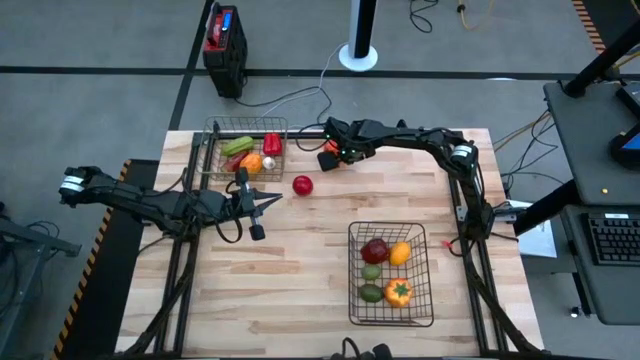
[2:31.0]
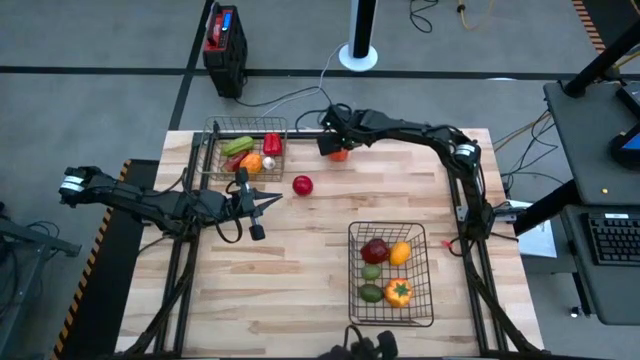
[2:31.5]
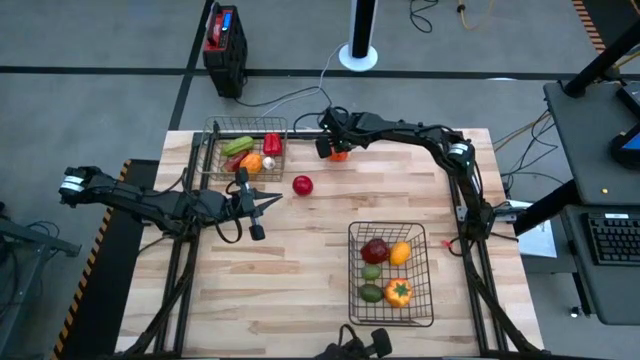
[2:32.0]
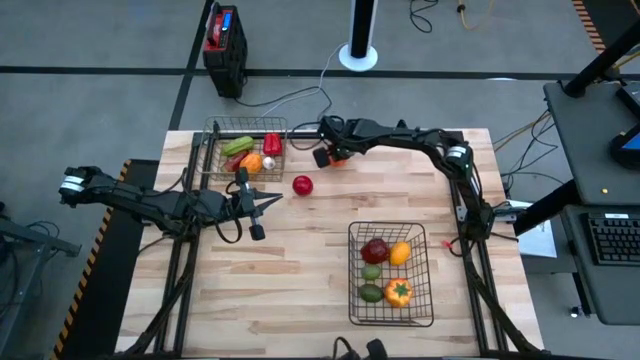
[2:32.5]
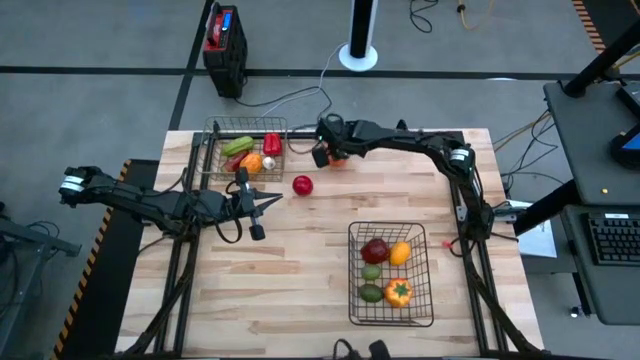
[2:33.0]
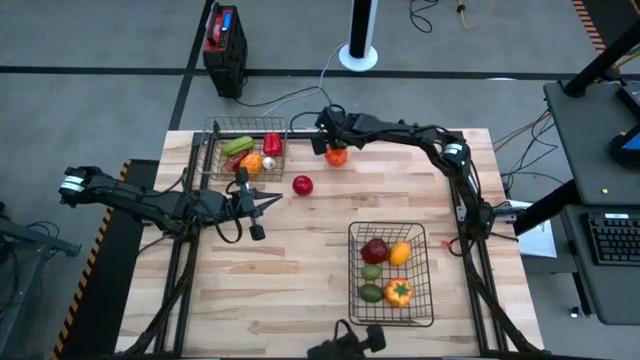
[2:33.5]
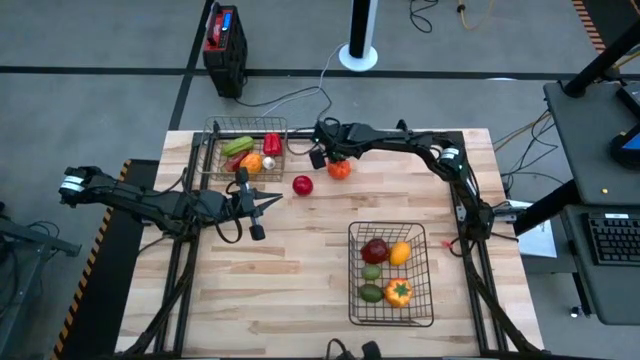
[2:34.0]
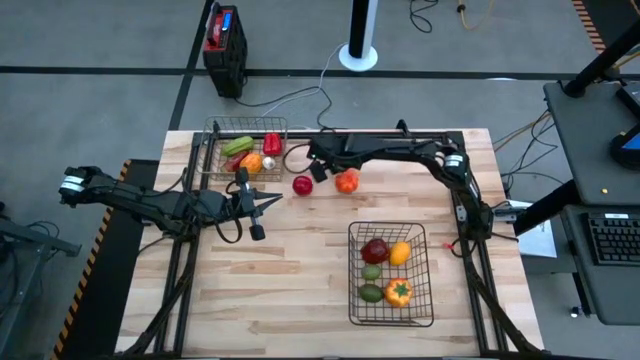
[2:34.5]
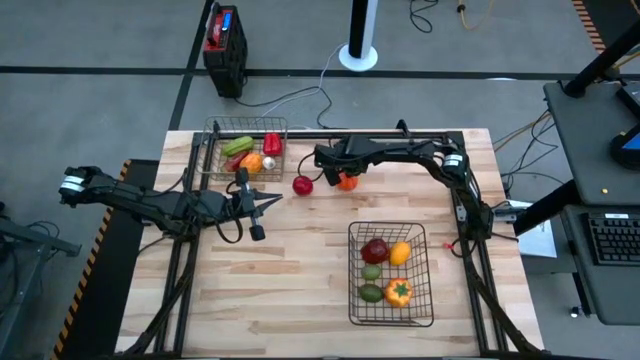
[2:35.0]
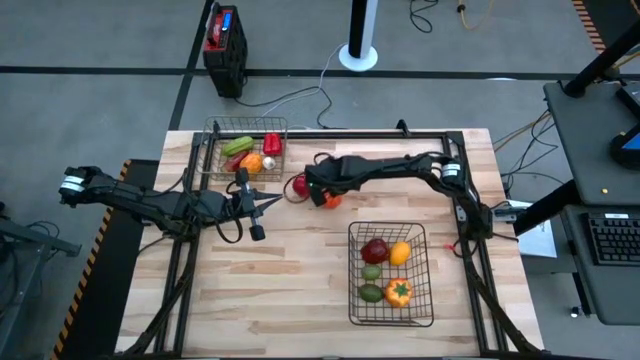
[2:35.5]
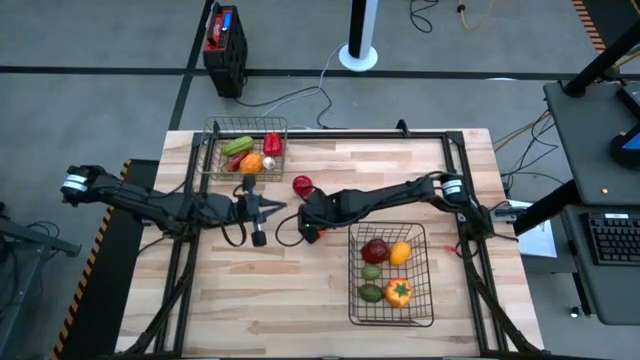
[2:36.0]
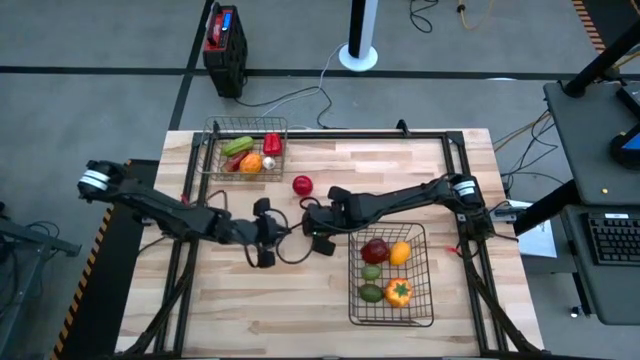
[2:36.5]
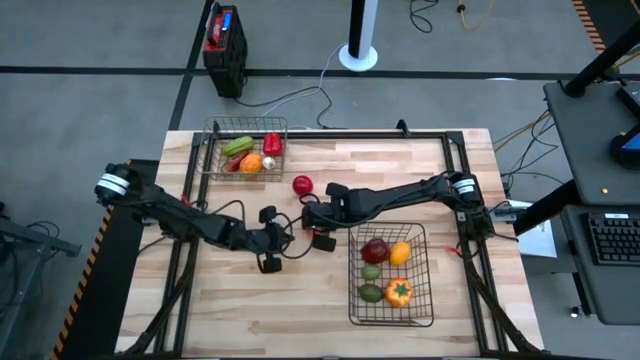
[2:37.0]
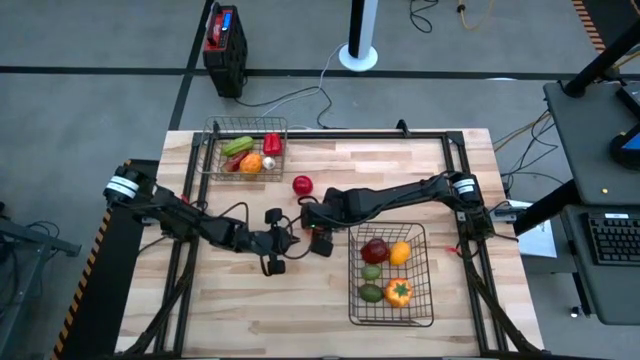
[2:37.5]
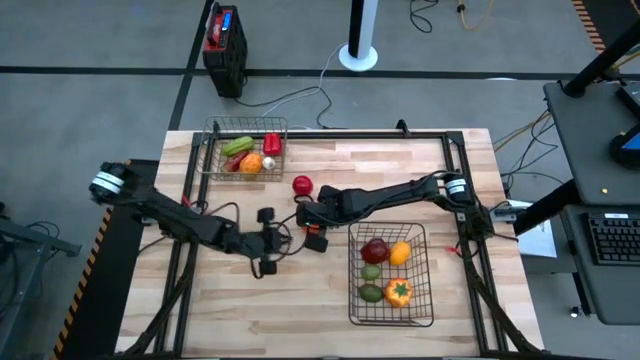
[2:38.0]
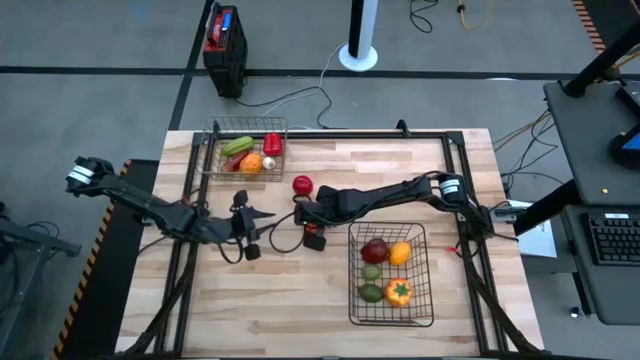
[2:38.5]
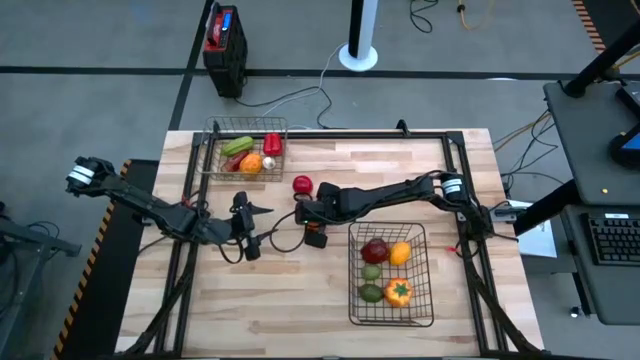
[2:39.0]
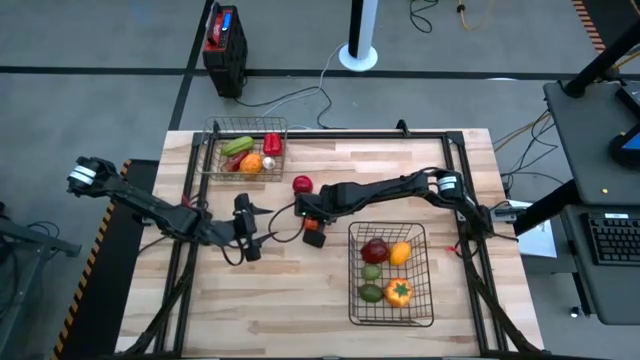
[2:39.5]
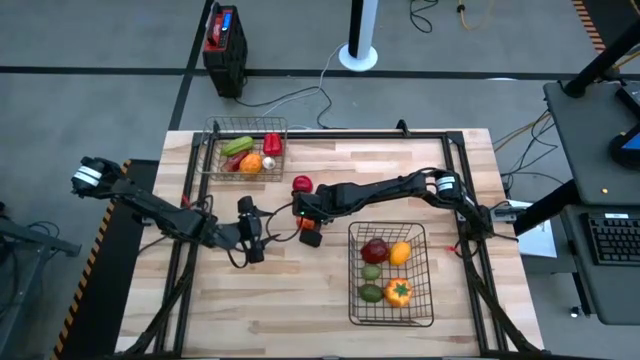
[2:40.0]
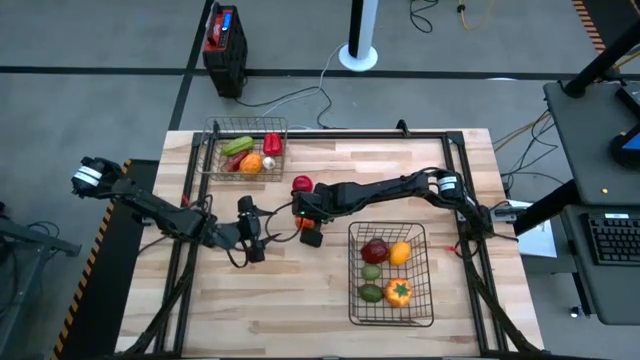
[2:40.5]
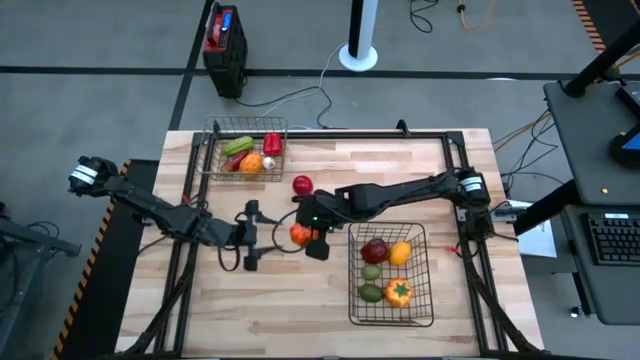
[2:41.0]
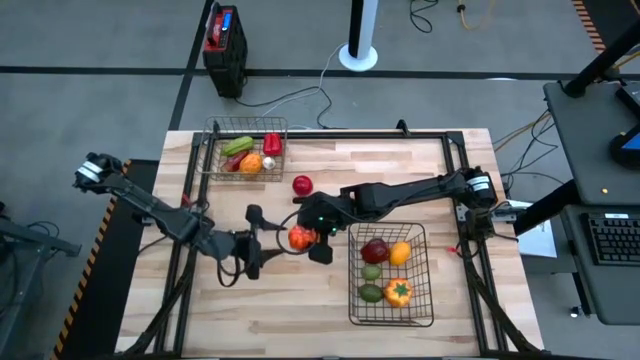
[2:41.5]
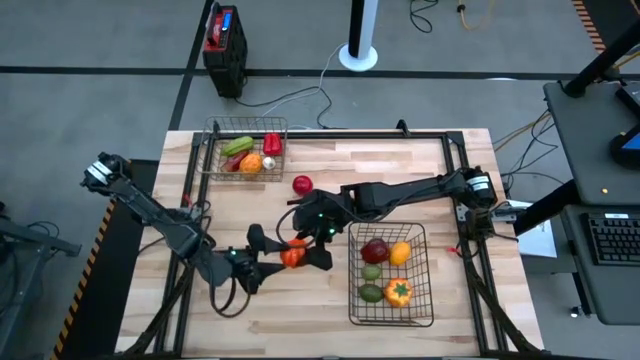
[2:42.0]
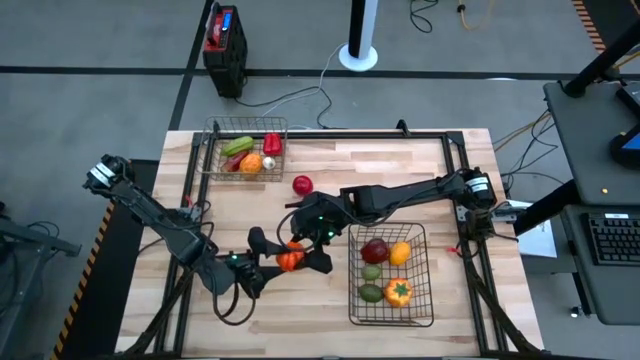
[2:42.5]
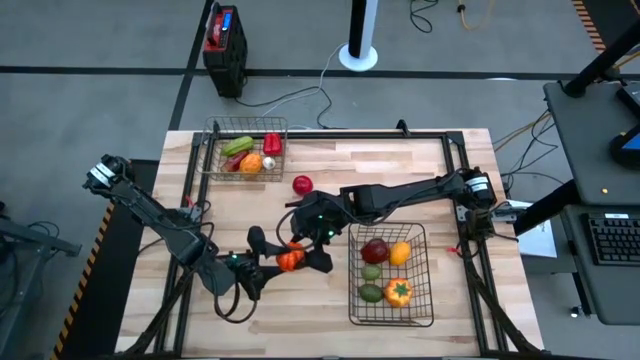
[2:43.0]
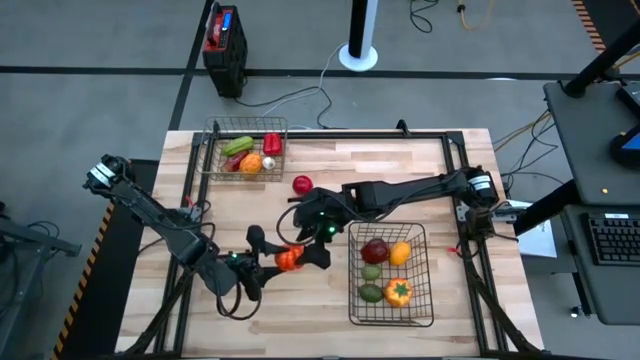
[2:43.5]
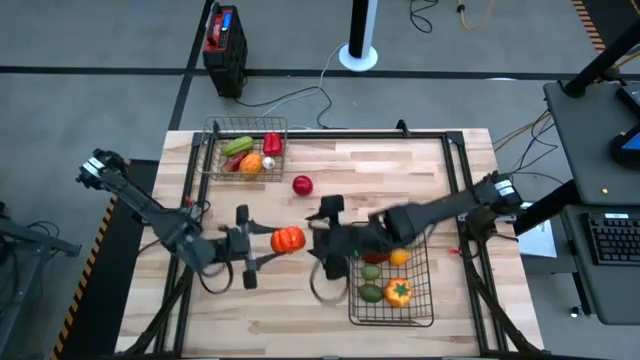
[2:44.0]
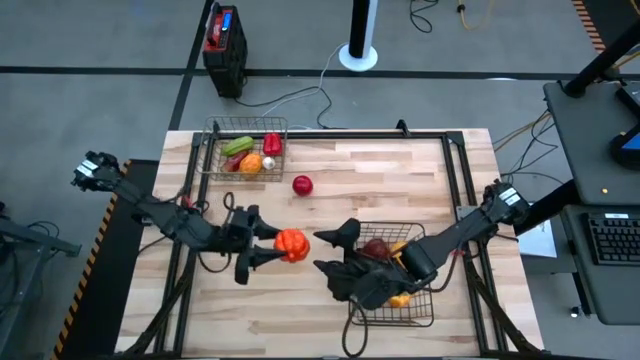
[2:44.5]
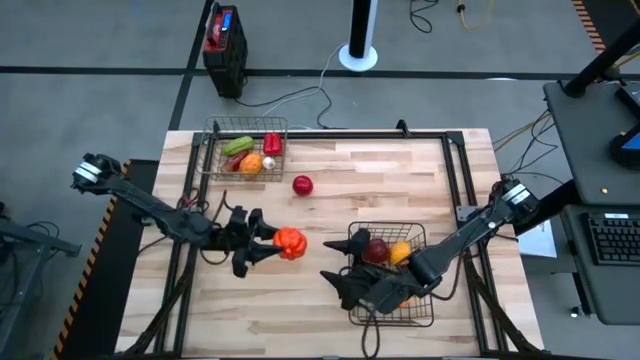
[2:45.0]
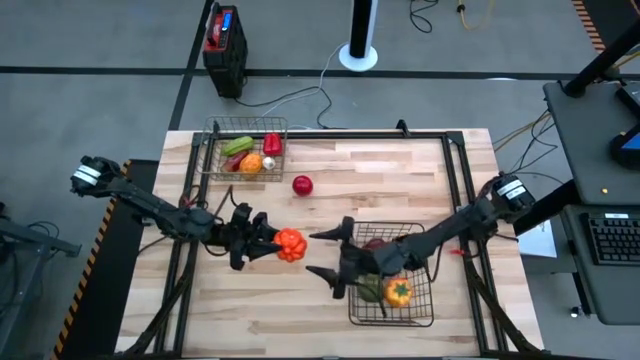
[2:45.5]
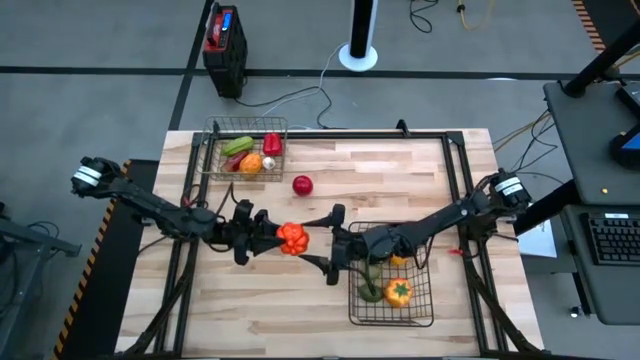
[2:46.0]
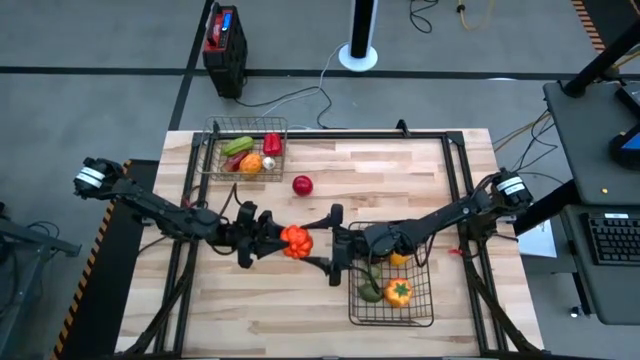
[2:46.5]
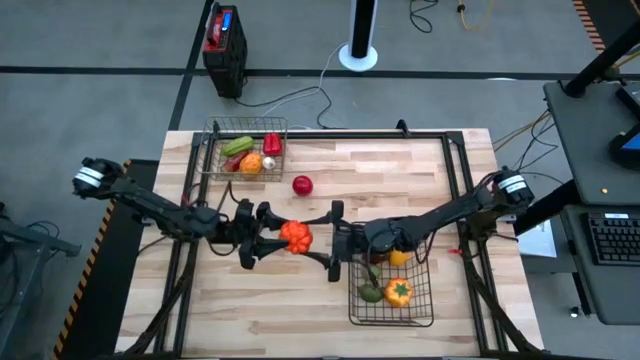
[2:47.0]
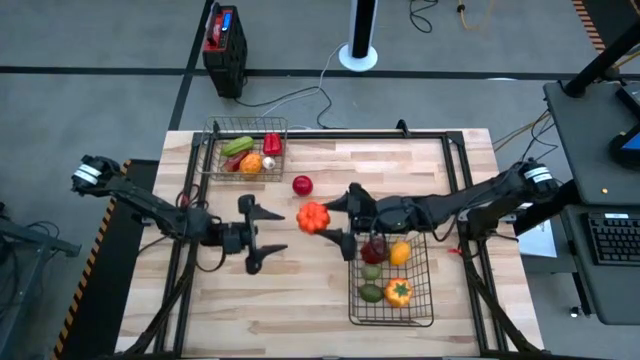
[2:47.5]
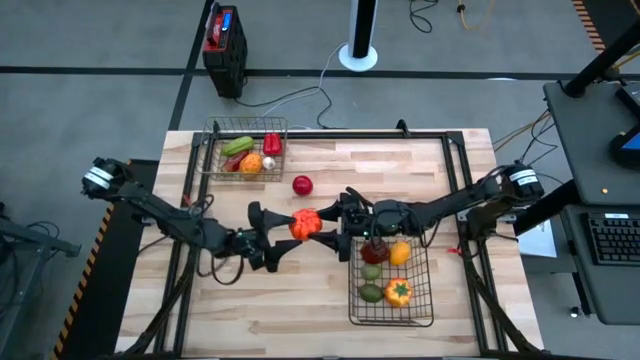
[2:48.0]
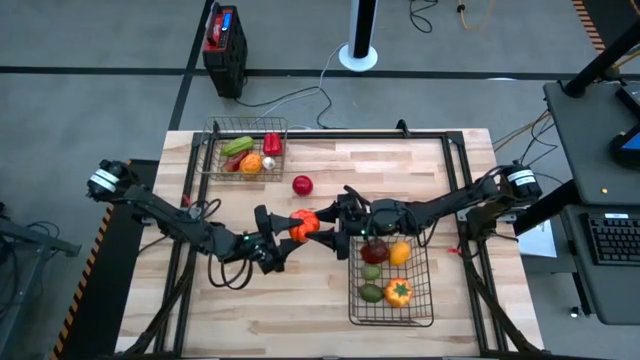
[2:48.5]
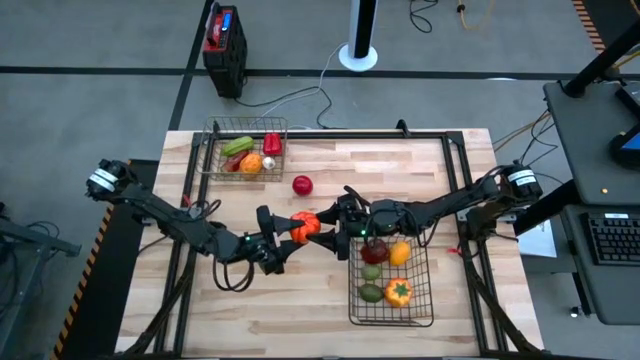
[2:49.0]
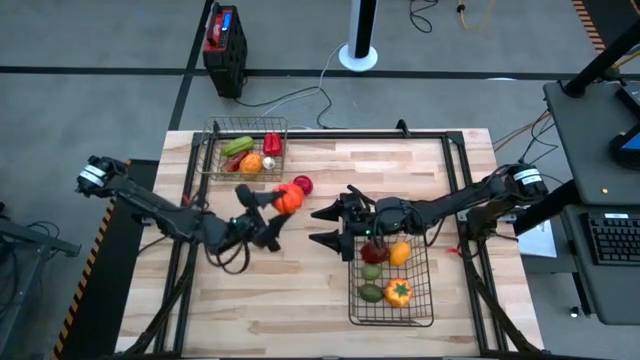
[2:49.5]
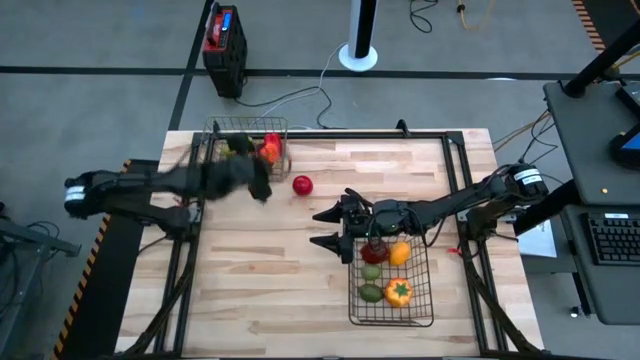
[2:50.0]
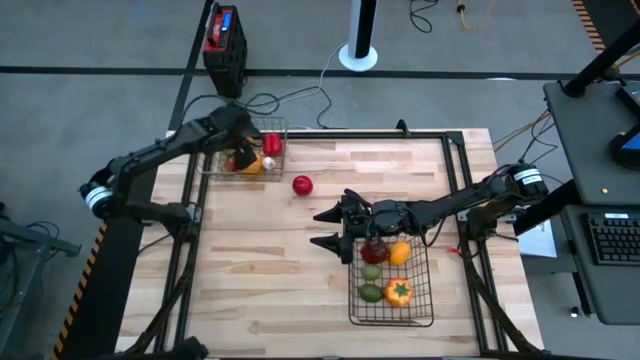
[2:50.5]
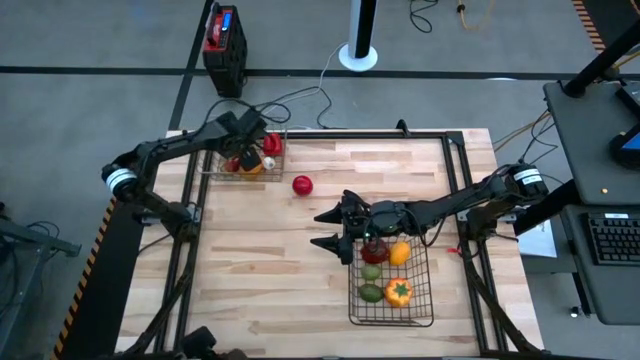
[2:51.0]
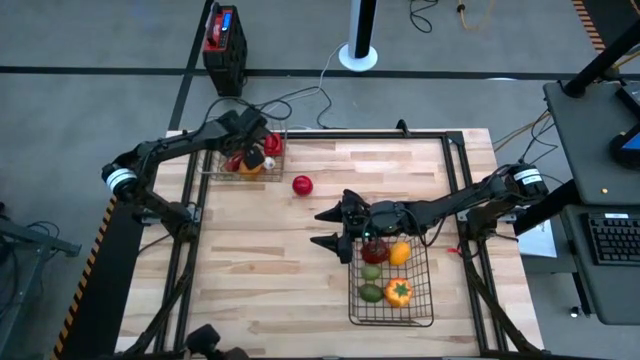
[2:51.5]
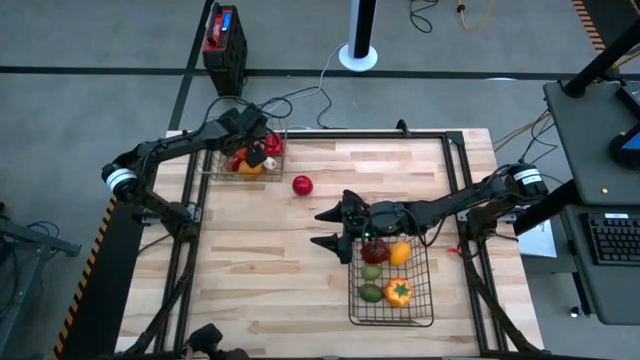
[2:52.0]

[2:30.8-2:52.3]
Task: Sort produce into baskets
Put the orange pumpkin into the gold wire basket

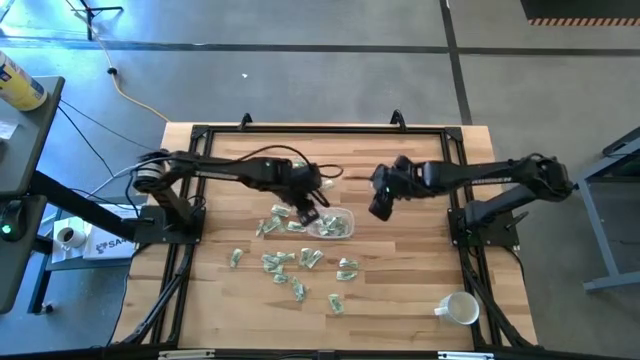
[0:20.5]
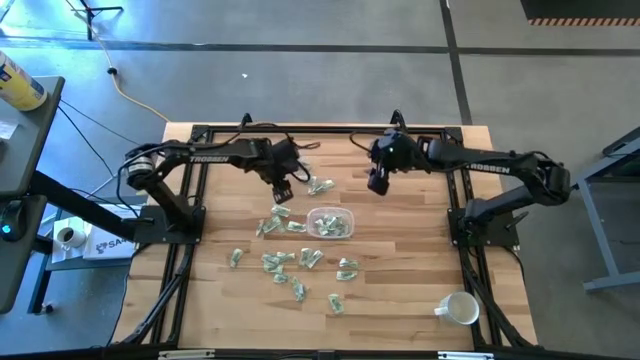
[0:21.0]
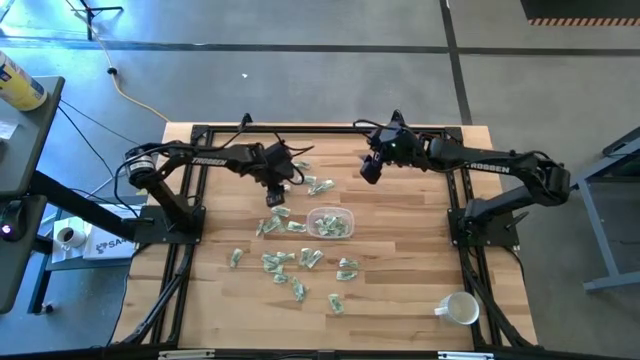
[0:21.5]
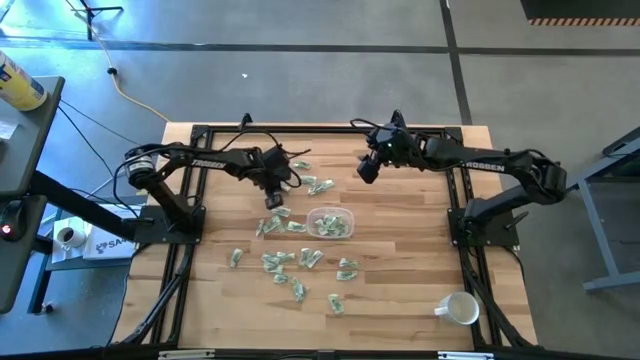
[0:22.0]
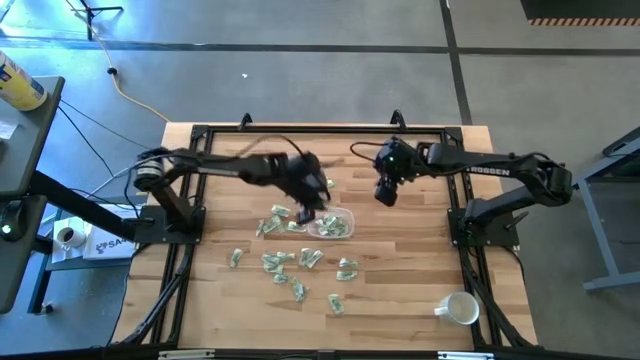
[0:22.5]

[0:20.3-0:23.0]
Task: Pick and place Stevia / Truvia into bins
Put the stevia packet into the transparent container
